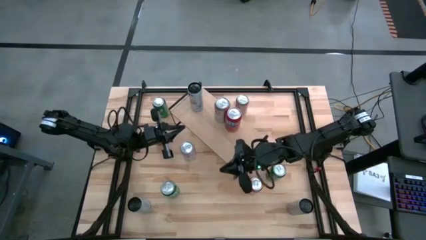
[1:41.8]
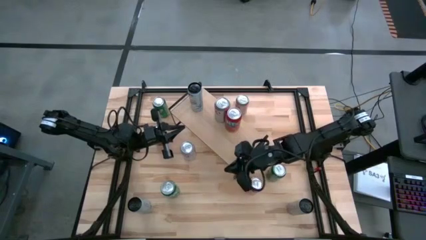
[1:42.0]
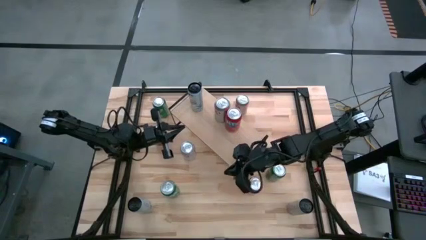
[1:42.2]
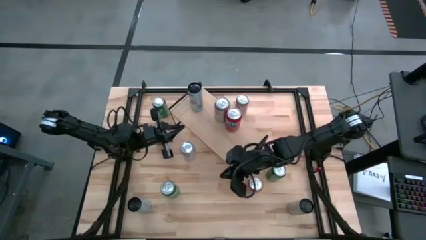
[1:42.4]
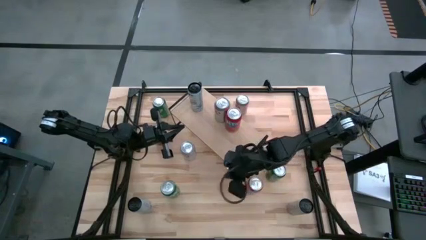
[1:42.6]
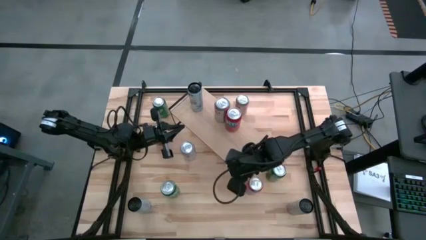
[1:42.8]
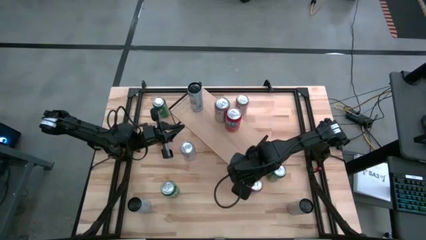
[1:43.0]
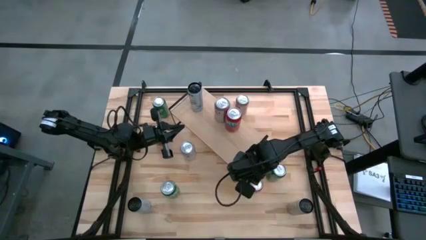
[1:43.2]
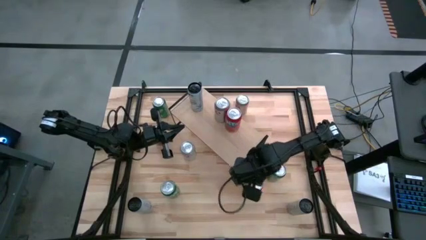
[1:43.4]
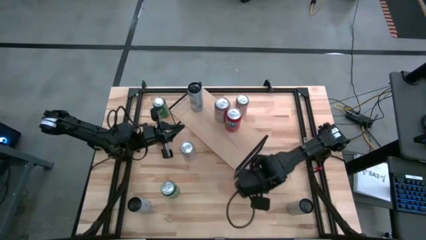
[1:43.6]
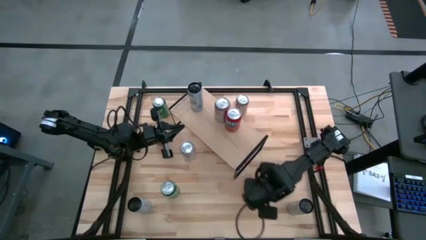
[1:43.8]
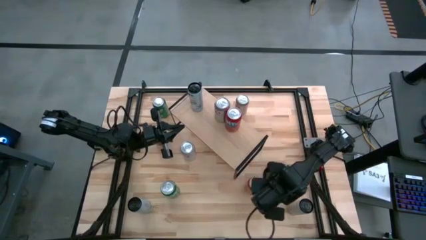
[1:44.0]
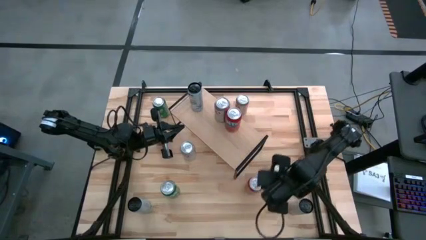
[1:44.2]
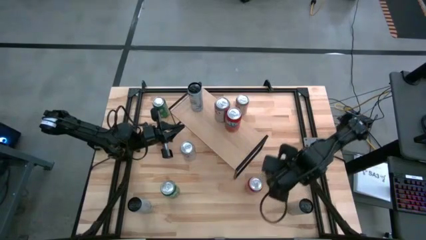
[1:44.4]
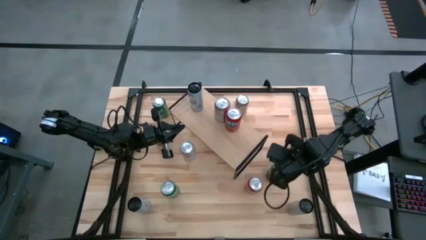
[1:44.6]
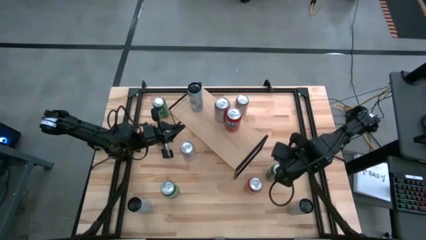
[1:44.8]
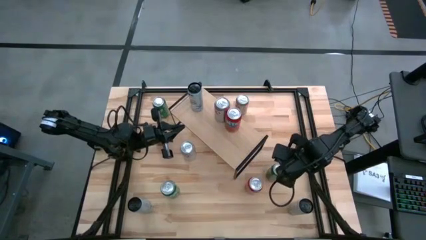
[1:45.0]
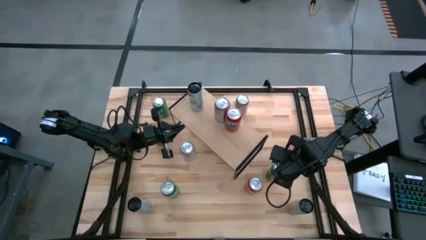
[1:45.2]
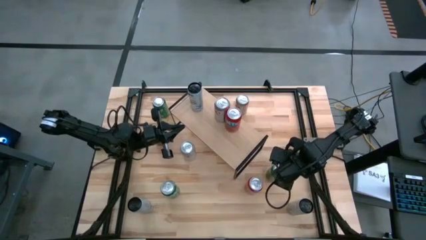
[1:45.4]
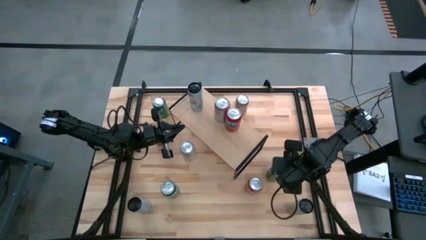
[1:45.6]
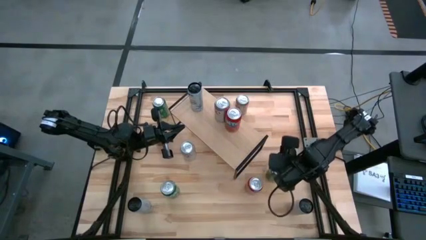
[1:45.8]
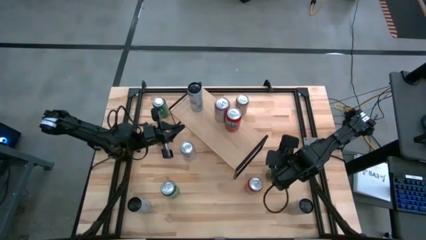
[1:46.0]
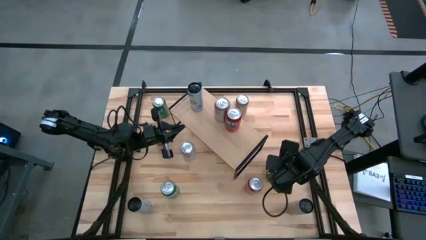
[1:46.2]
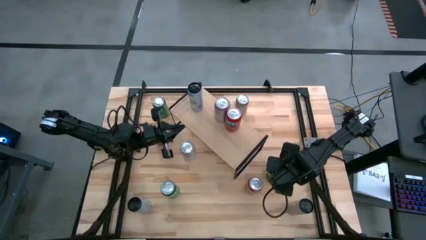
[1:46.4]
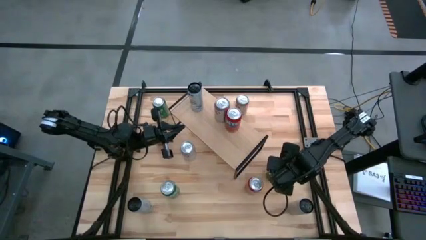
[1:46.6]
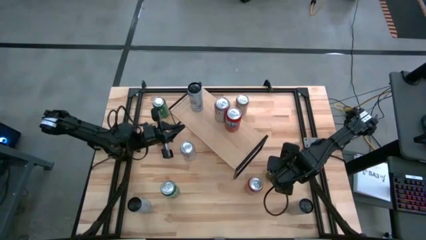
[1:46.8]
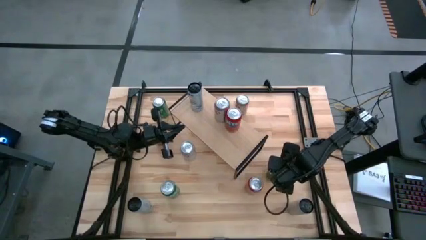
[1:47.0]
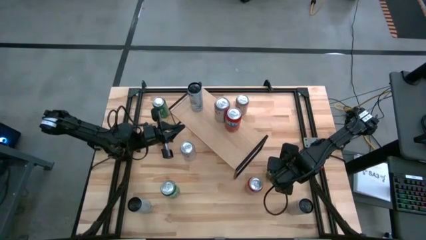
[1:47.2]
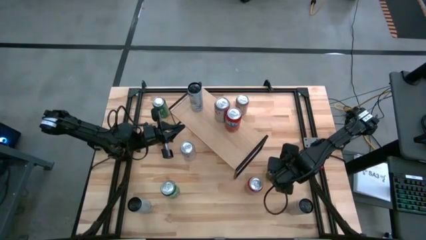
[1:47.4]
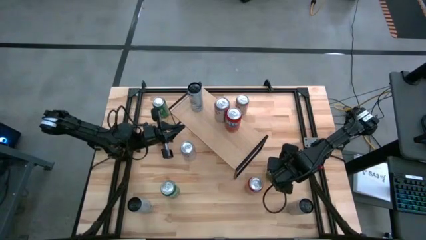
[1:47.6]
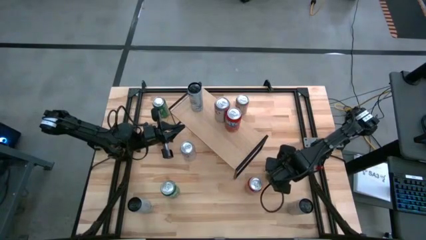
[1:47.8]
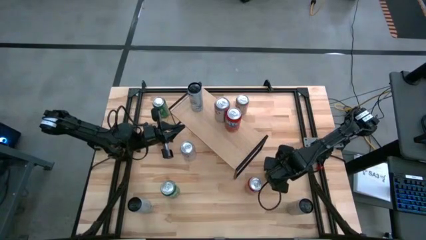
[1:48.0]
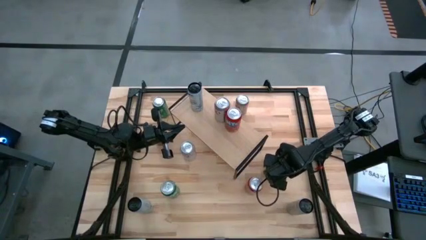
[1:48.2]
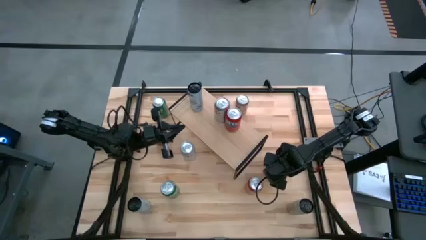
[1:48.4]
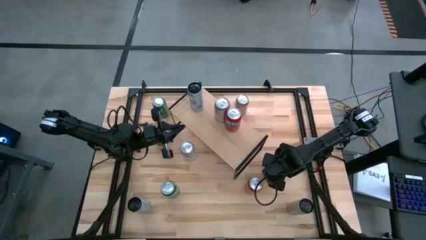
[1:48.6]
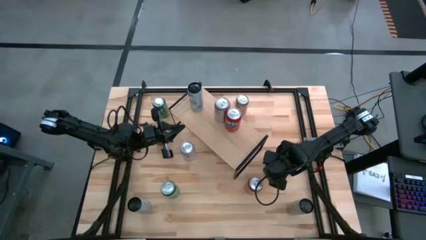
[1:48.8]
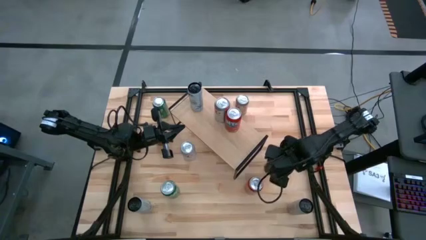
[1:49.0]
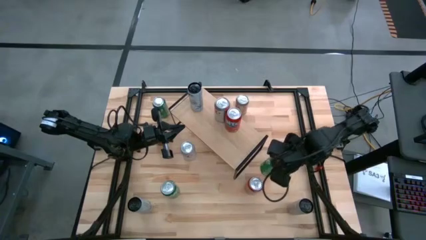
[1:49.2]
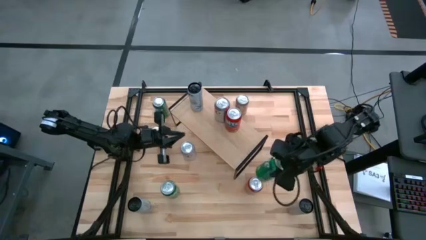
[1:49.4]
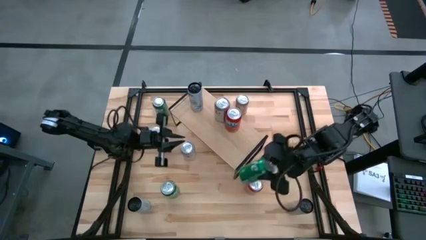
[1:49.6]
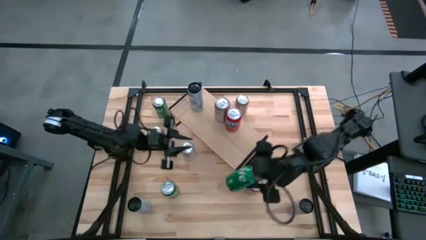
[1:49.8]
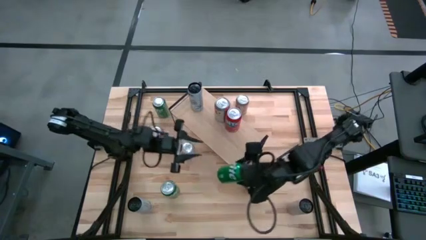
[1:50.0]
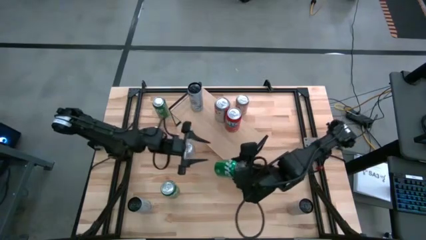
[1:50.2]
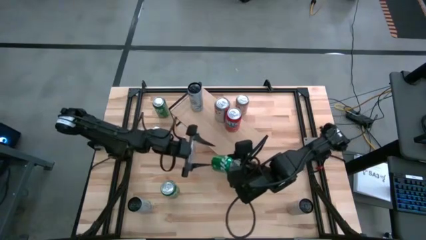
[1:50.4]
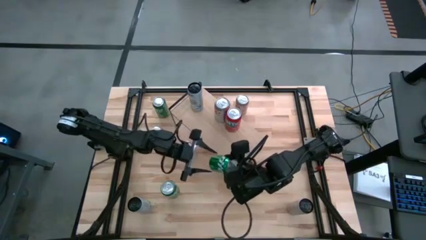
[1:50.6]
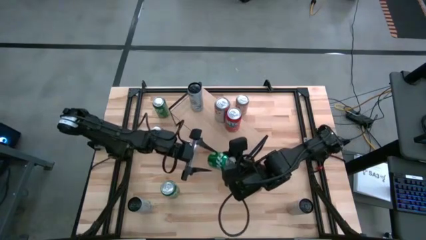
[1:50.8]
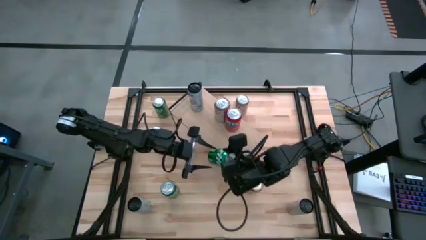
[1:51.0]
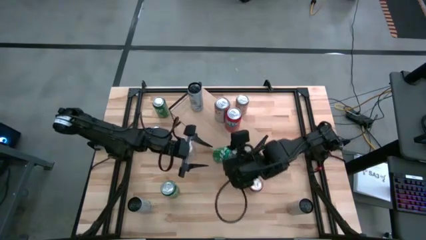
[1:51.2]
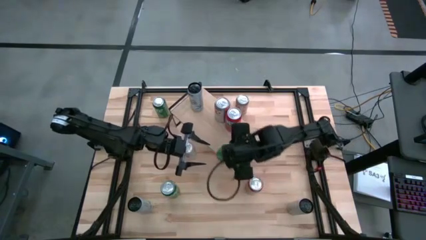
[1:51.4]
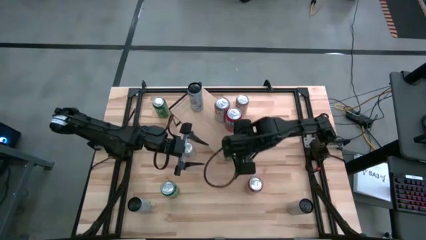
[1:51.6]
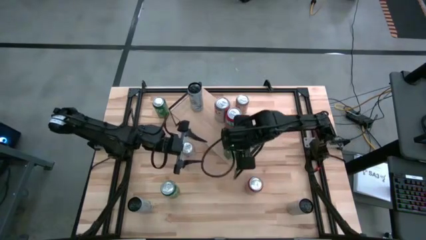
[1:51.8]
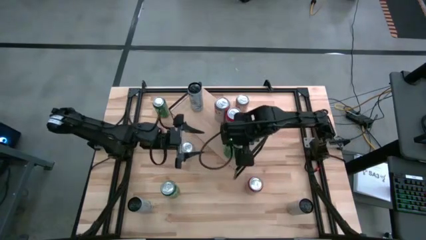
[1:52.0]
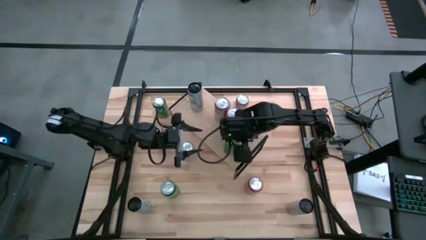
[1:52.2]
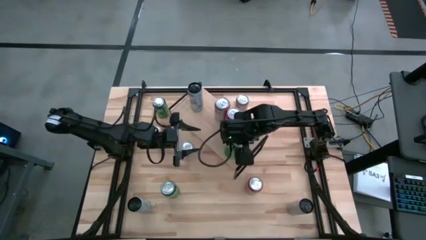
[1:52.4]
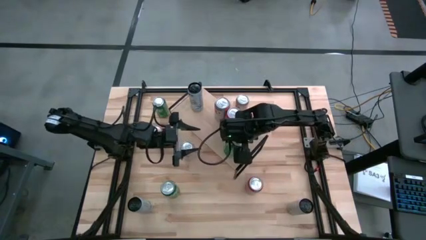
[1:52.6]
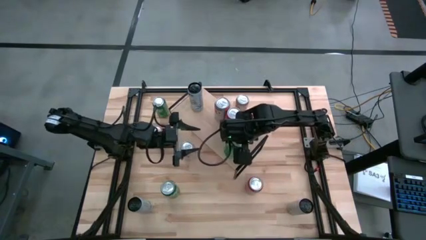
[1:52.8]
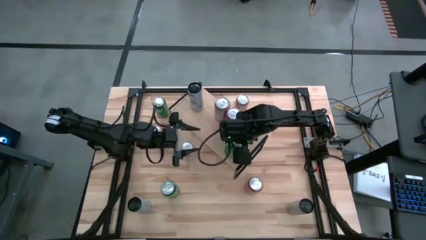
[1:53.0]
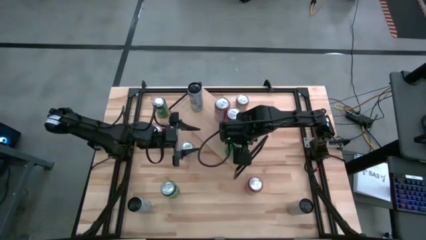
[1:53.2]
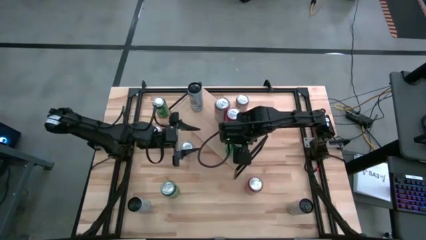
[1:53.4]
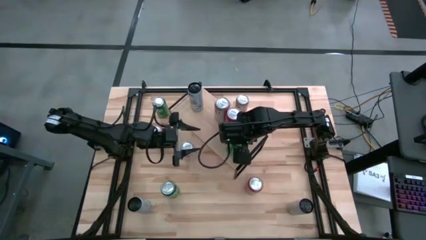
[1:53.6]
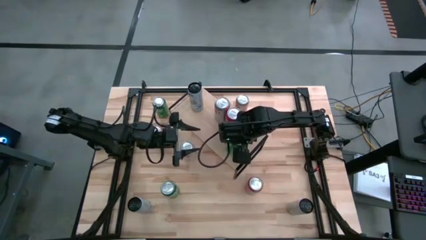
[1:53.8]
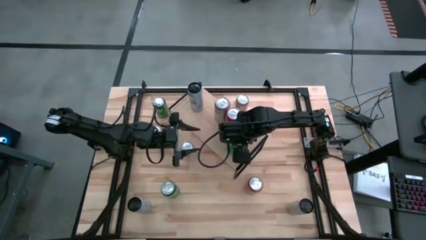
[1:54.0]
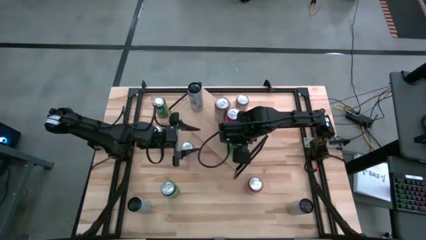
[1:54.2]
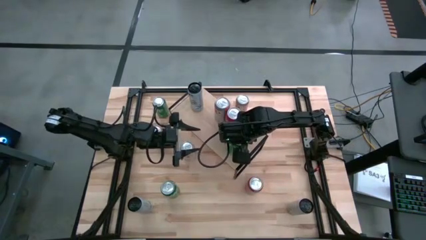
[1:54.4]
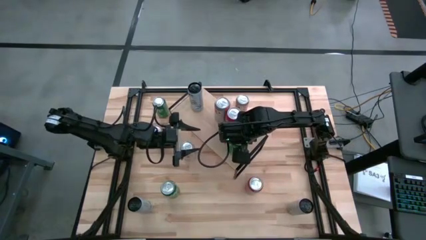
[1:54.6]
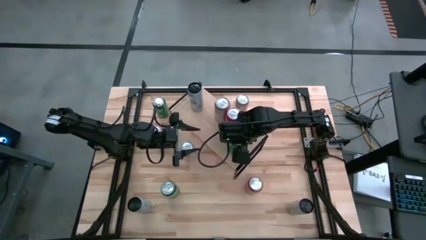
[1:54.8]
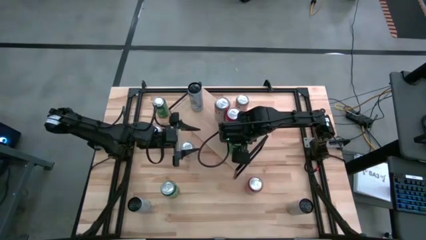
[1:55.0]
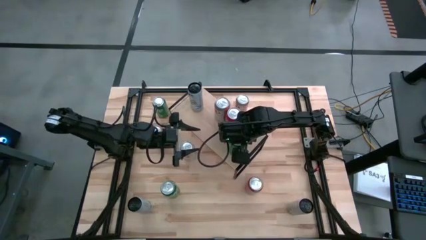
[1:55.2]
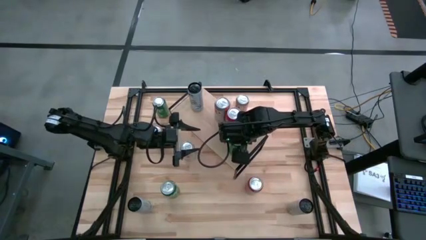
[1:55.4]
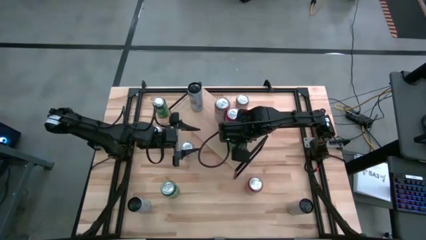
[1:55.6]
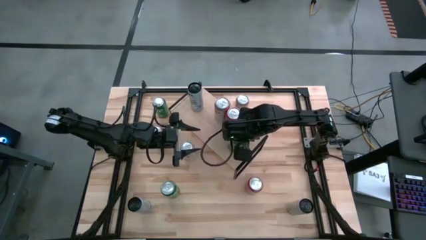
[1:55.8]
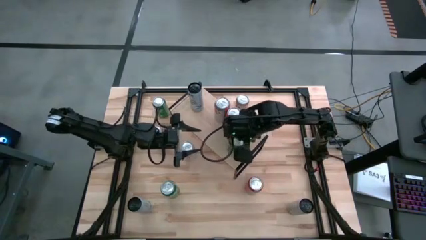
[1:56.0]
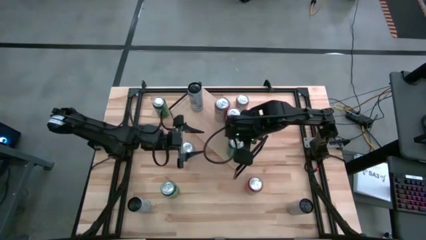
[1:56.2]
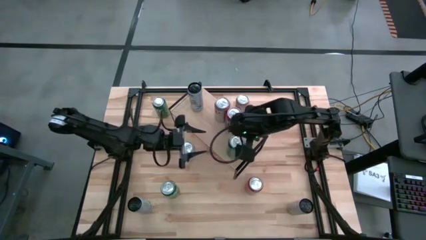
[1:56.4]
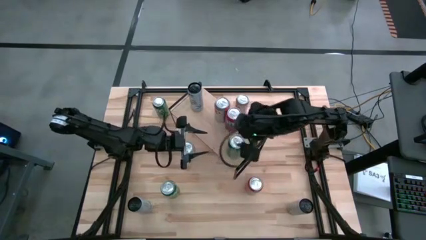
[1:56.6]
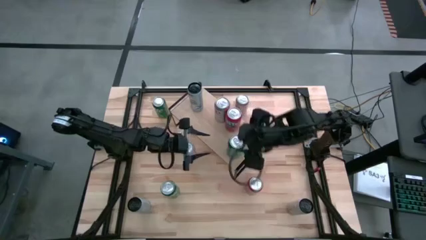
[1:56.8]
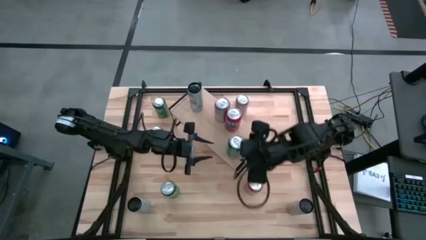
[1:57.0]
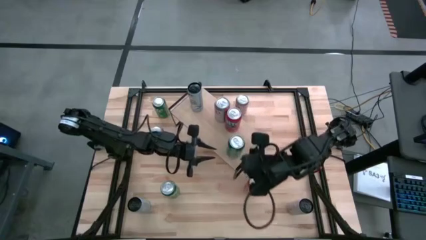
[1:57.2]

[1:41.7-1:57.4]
Task: Place canned beverage on shelf
Put the bottom right green soda can on the shelf

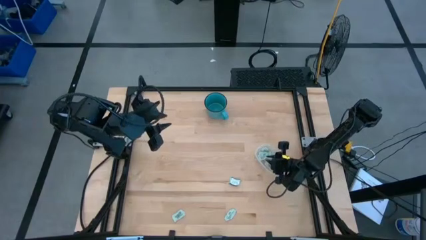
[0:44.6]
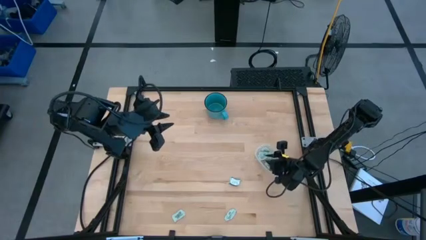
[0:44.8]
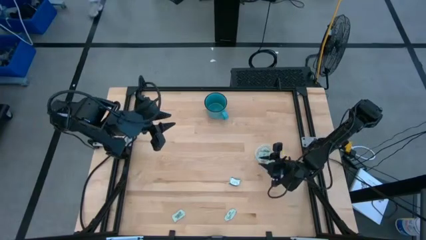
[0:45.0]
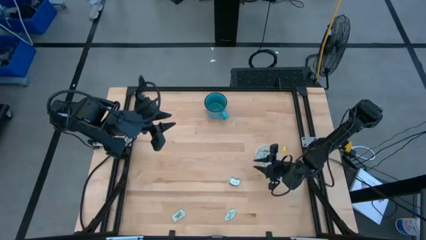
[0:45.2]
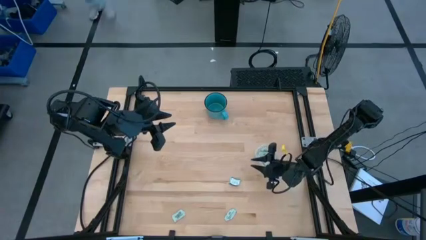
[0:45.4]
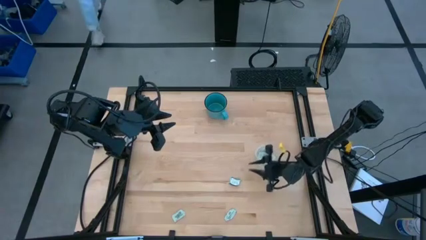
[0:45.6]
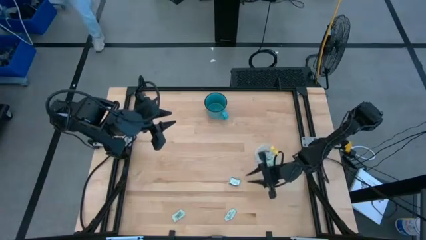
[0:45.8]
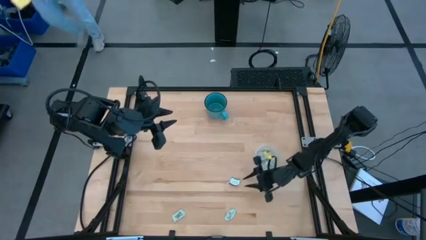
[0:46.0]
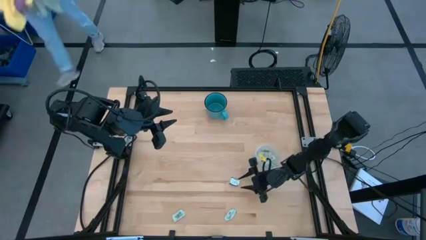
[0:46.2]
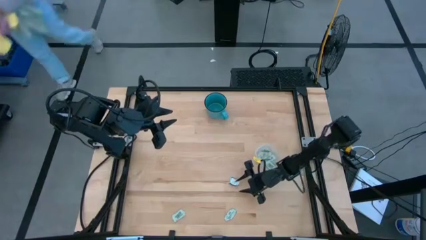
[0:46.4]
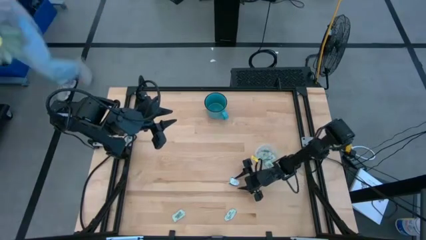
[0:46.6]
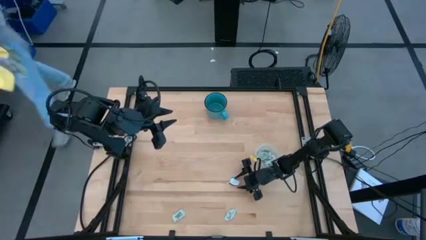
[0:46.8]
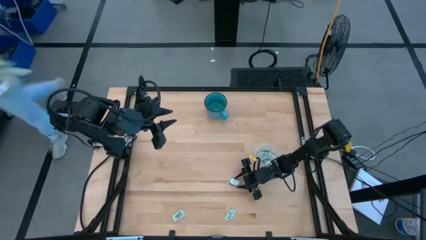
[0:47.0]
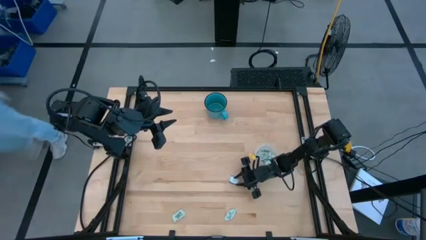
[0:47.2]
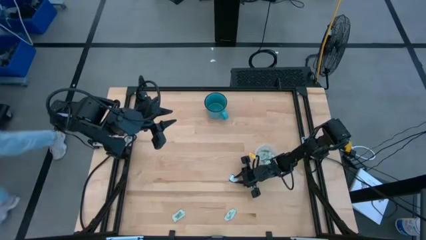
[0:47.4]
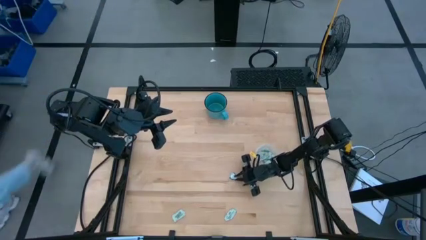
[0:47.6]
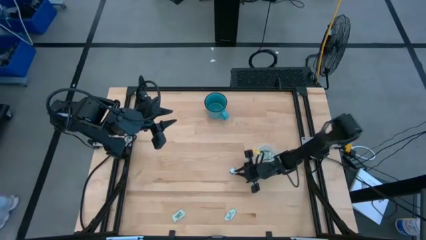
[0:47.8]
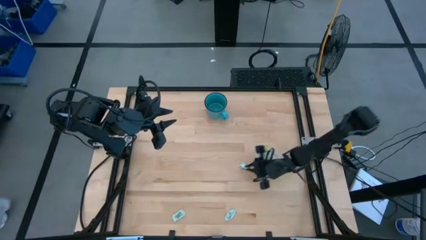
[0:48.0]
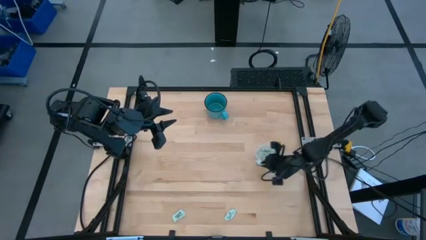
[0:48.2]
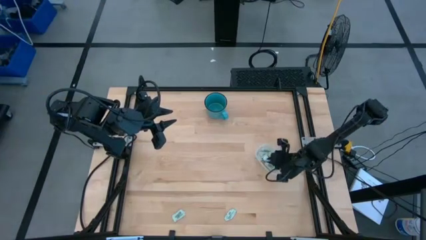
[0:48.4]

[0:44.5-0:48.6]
Task: Pick and place Stevia / Truvia into bins
Put the green truvia packet into the transparent container
